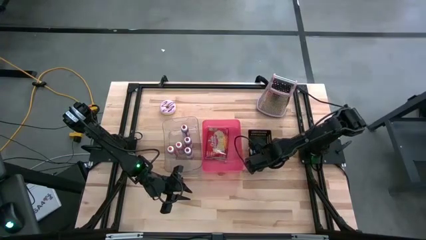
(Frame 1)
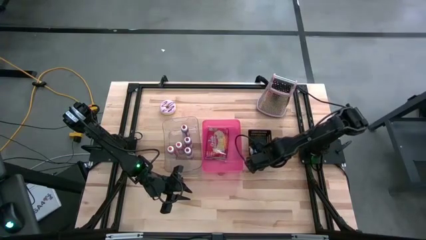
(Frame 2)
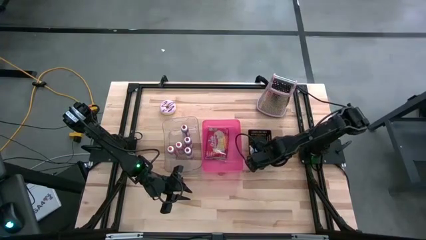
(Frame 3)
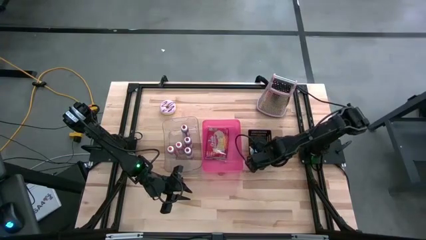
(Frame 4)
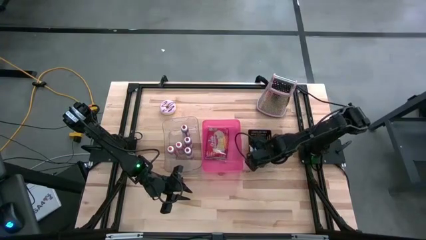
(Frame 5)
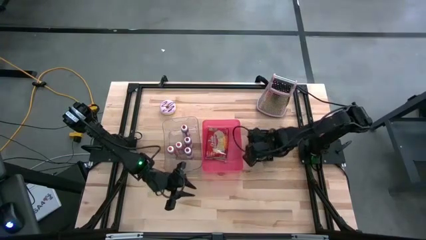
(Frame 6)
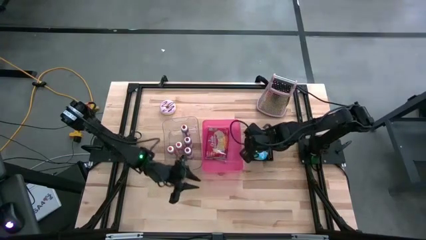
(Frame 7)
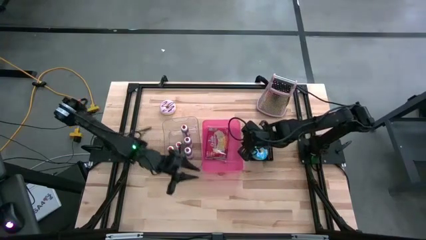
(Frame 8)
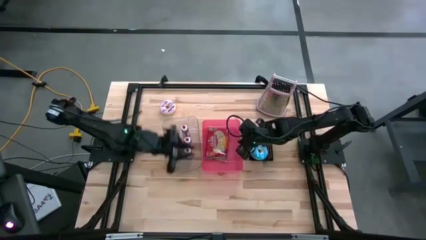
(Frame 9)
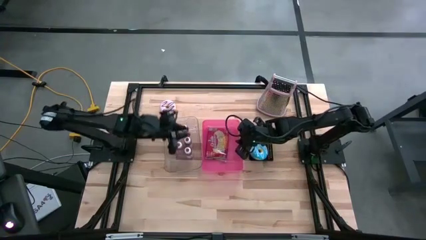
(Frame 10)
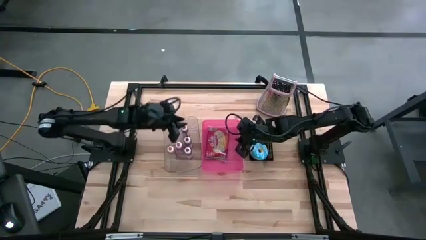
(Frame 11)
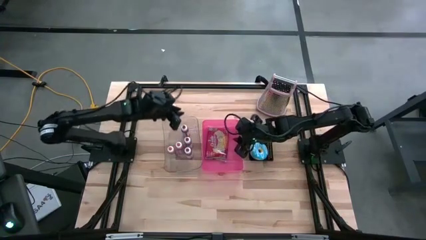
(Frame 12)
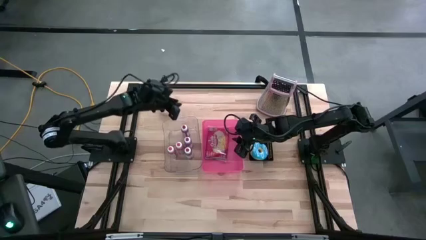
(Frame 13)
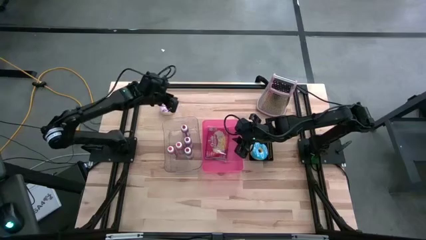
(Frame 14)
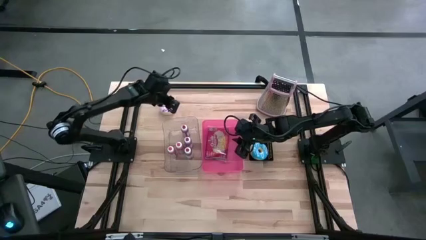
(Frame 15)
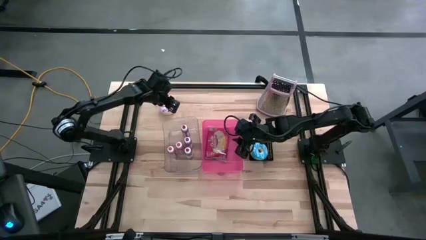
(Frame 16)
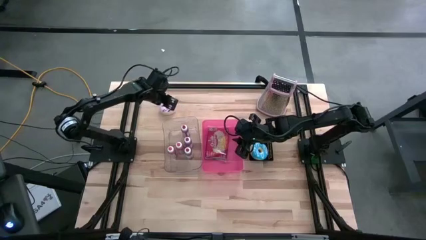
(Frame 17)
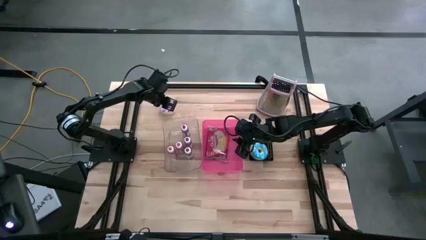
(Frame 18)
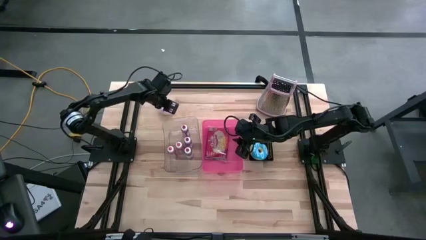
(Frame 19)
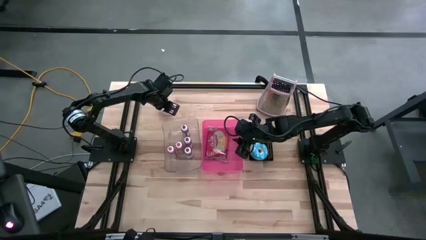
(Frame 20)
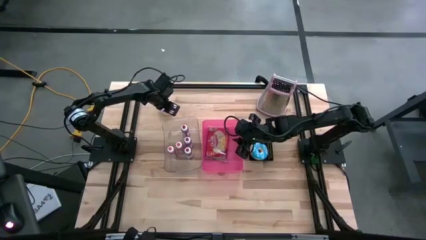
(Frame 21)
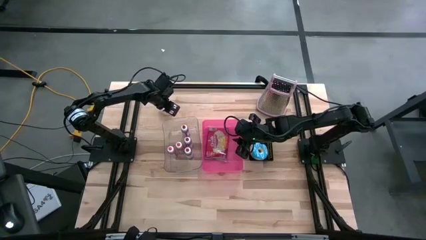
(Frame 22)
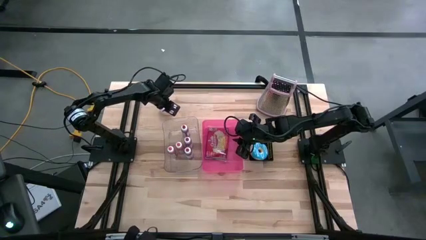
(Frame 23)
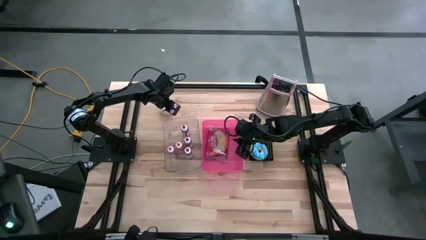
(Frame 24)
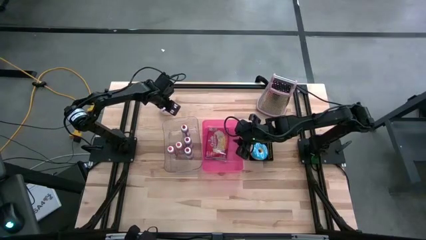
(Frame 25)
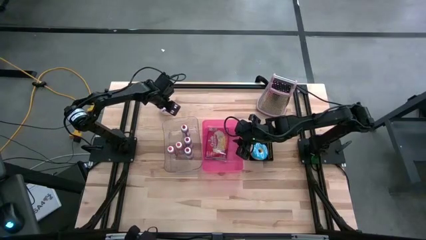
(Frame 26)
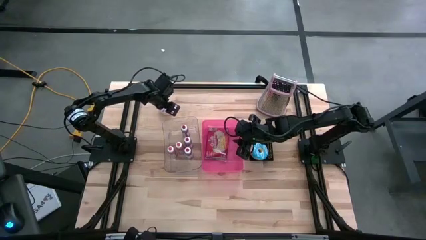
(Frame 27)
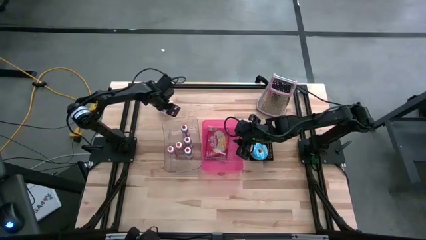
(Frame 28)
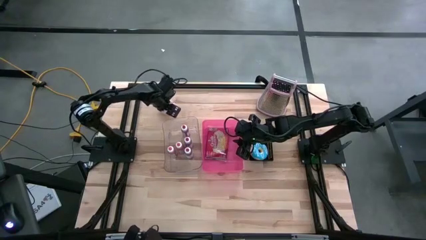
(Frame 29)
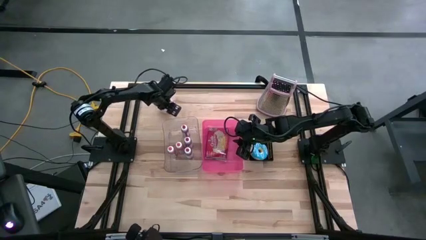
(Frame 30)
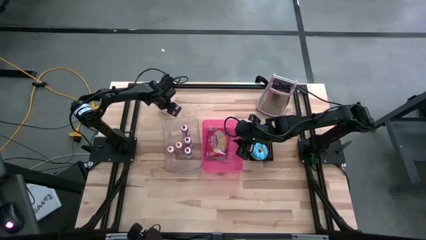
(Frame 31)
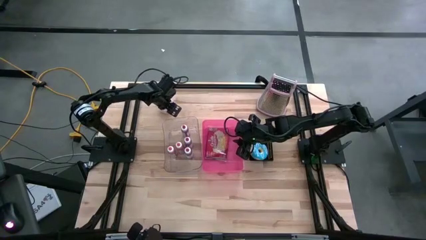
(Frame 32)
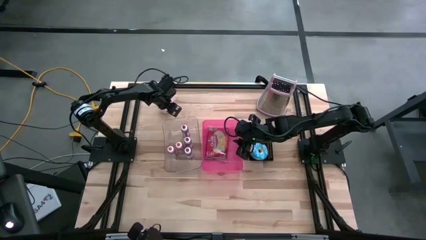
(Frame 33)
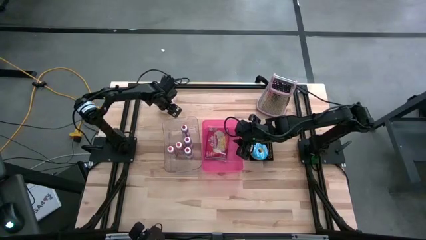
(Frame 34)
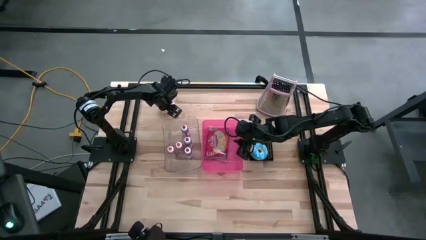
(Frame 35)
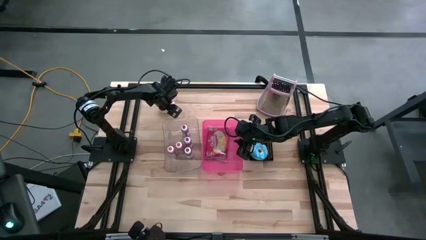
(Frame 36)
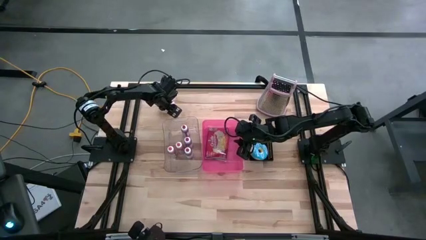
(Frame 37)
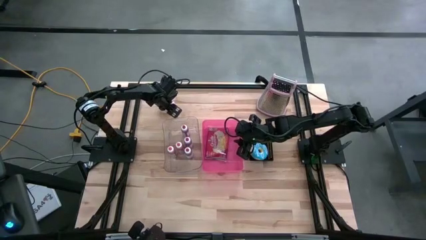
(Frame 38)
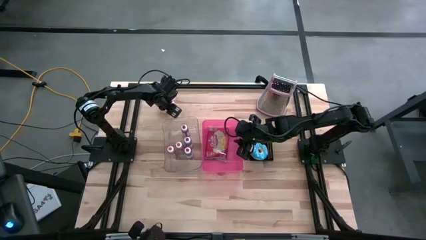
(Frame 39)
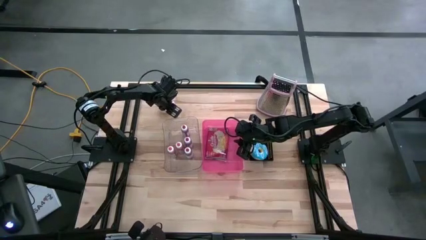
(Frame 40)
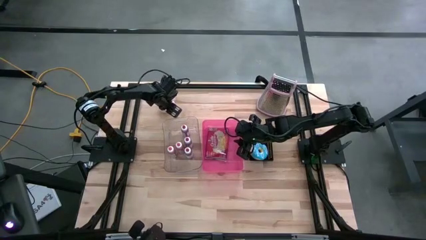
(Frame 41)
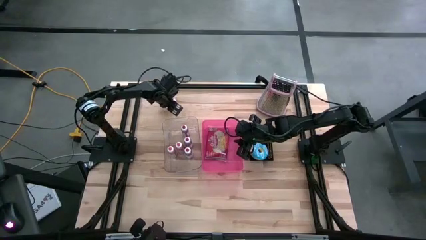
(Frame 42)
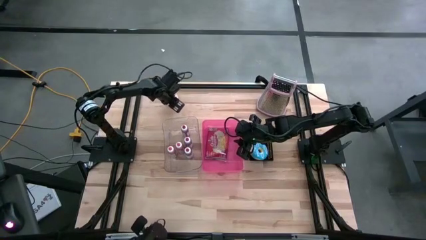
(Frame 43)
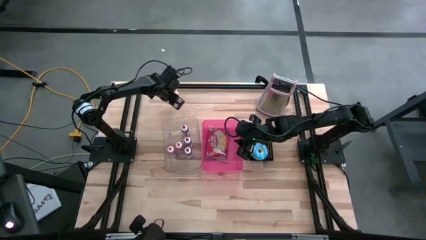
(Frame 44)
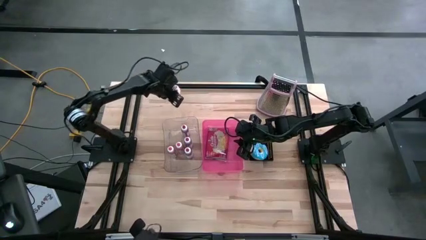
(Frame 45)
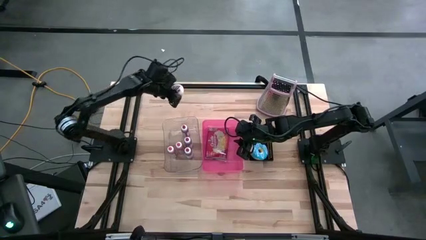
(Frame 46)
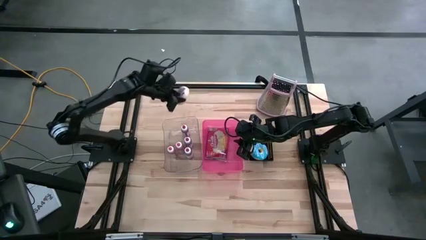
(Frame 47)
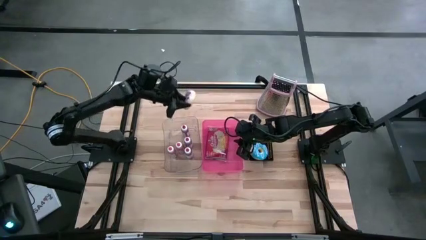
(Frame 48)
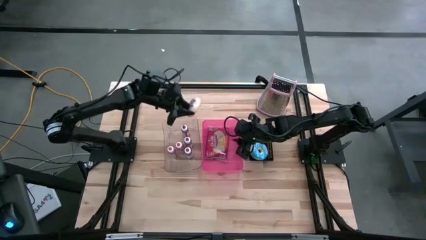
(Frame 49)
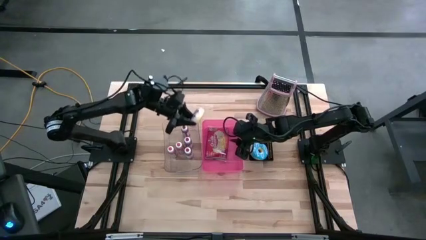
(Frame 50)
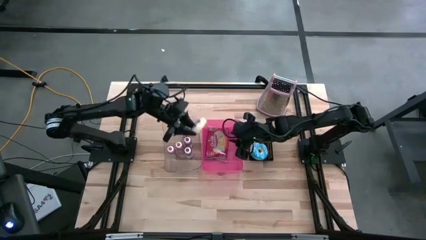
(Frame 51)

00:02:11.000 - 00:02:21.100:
Task: Pick & Place Food Item
Put the violet donut into the black bin

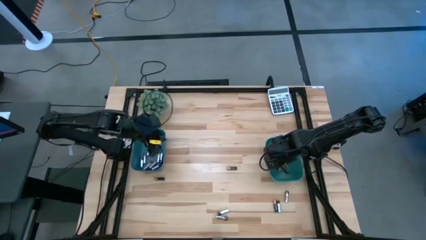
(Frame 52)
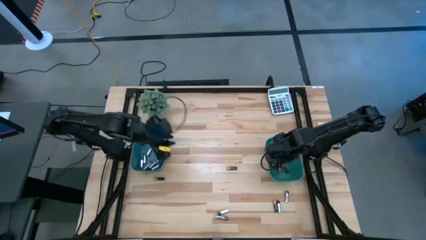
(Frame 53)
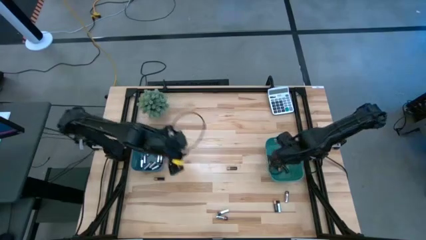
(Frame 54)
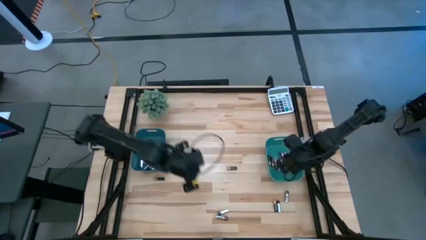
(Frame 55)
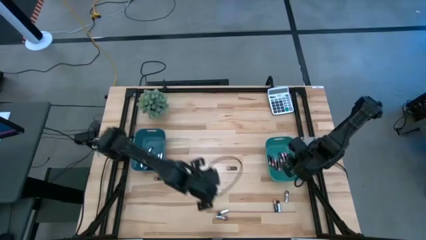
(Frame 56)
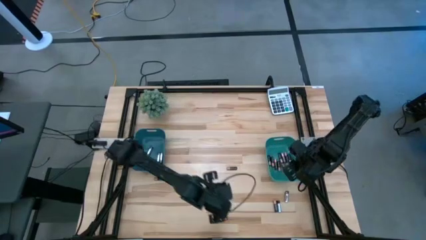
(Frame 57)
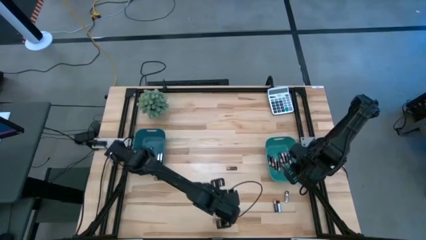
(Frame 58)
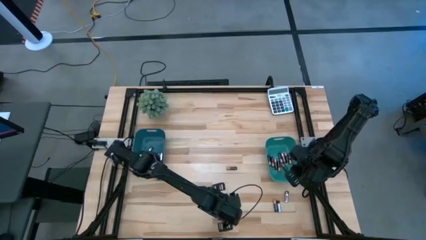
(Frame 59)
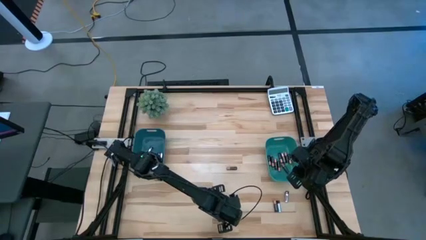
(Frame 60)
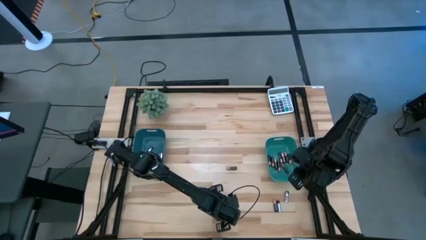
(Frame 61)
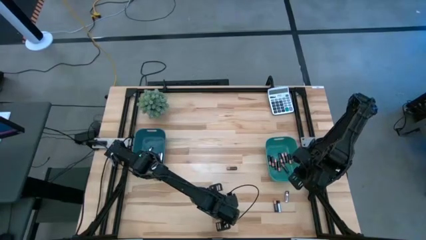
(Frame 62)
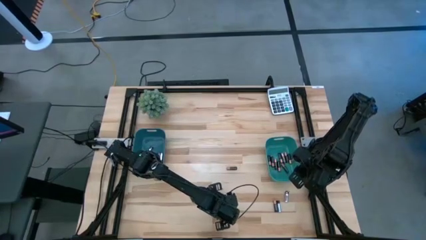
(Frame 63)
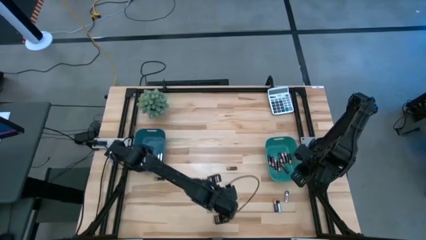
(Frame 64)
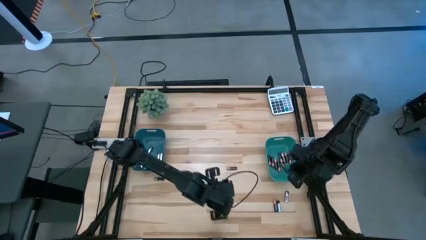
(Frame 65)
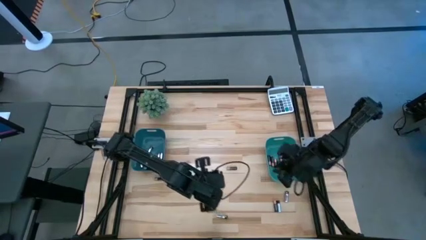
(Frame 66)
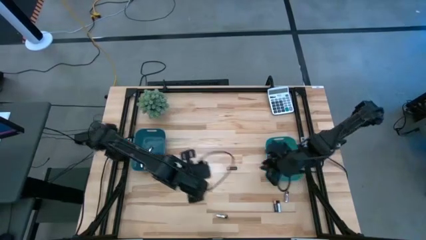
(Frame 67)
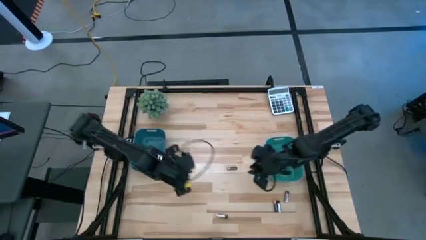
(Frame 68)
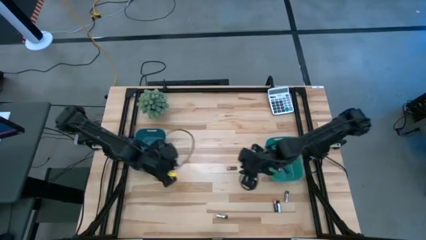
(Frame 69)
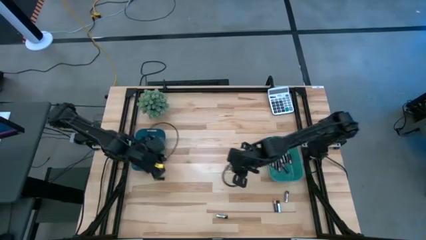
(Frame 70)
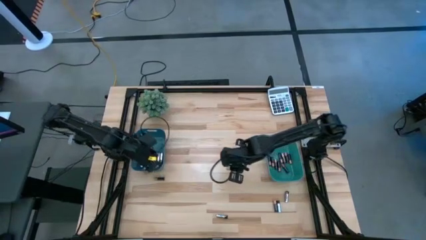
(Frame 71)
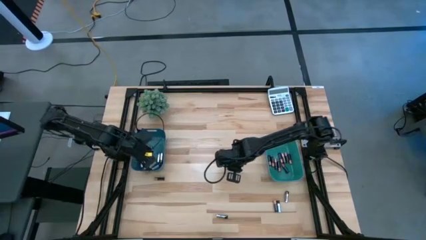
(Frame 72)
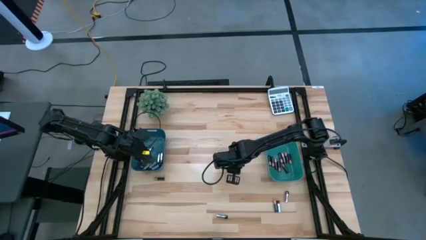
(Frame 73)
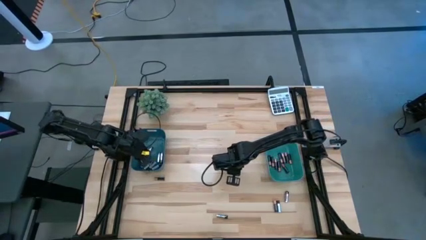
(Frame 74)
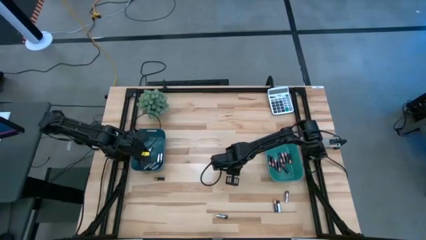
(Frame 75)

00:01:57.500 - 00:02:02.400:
Task: Sort batteries
Put the silver battery into the blue bin

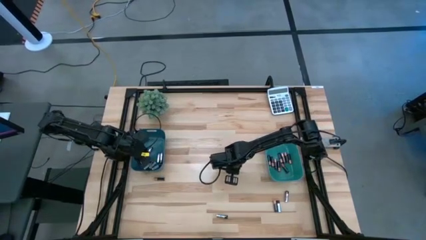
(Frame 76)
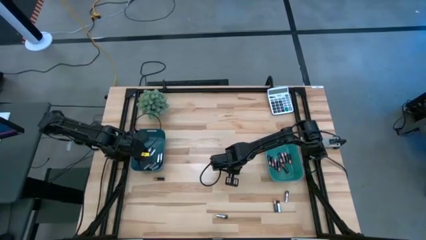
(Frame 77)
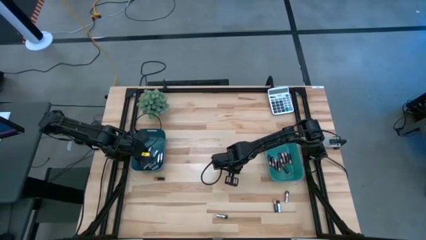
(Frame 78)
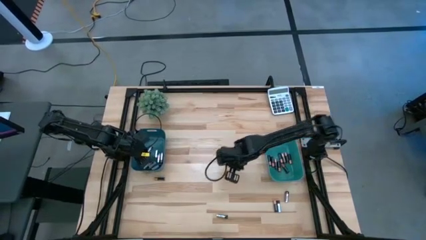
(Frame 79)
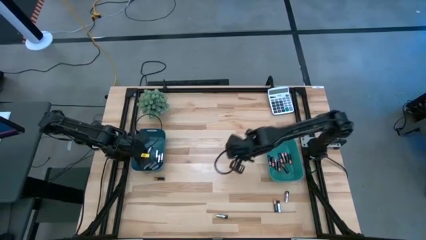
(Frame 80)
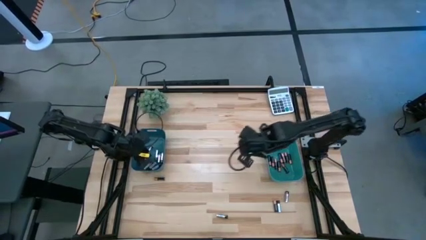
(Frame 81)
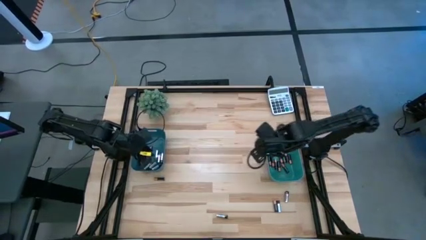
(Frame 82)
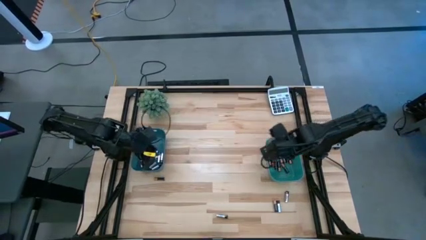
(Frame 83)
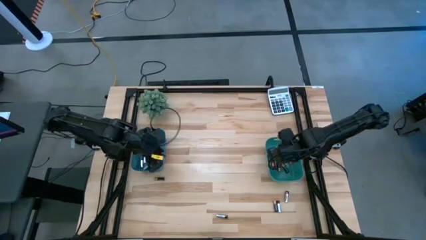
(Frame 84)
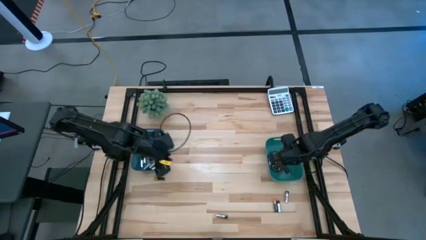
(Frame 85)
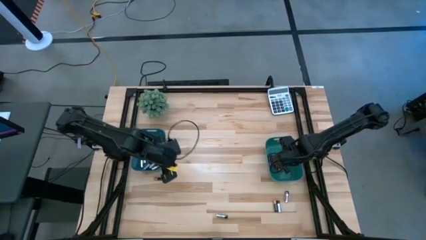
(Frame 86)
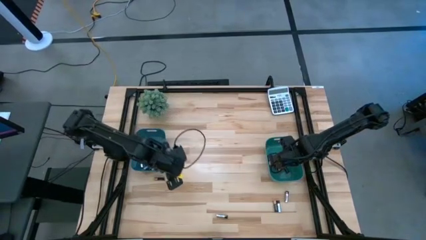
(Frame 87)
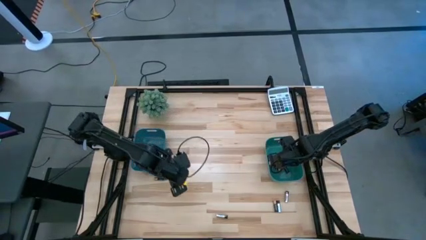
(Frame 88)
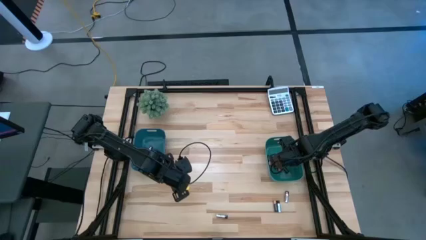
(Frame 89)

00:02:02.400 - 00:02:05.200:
Put the black battery into the green bin
